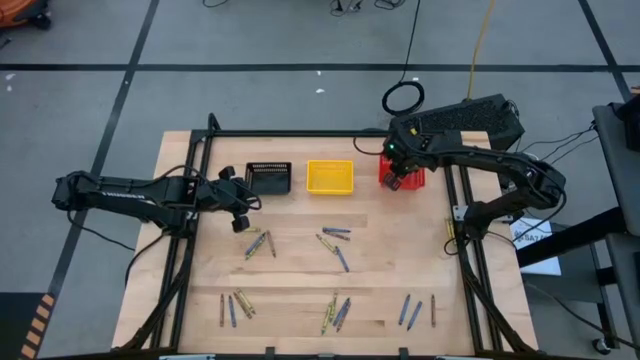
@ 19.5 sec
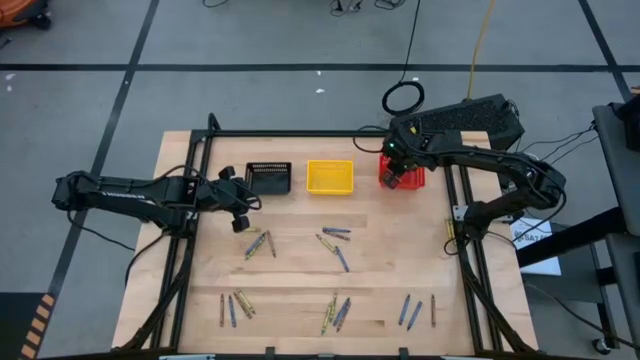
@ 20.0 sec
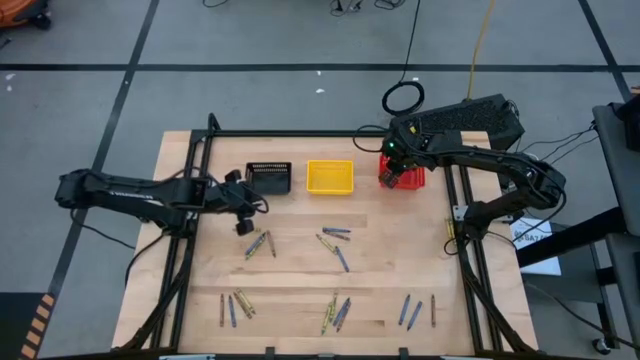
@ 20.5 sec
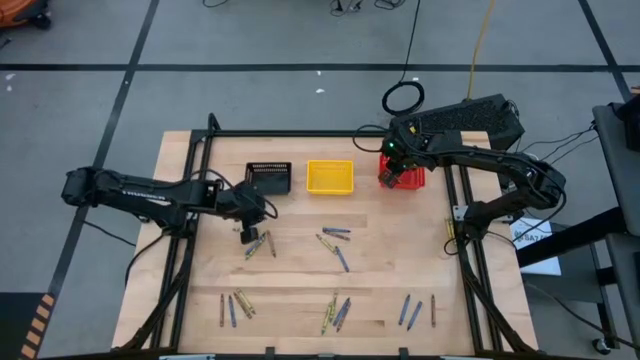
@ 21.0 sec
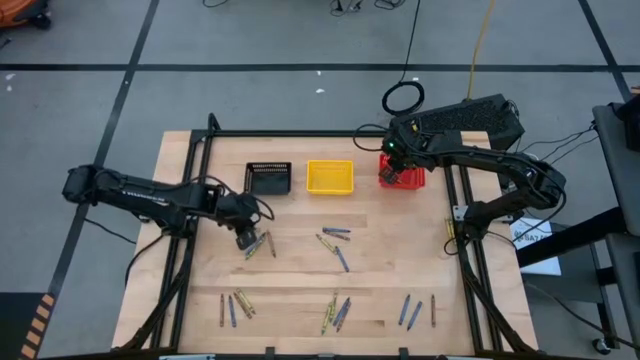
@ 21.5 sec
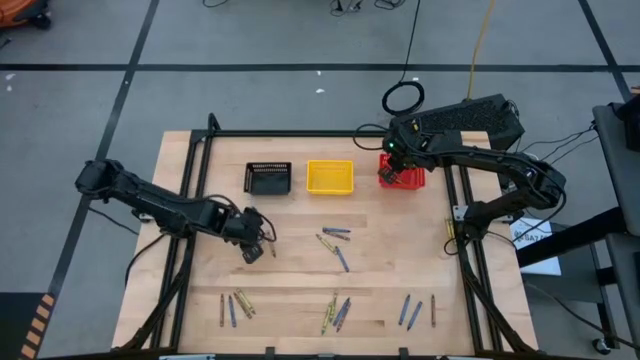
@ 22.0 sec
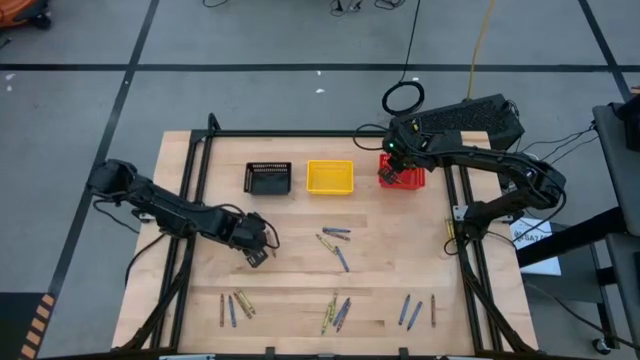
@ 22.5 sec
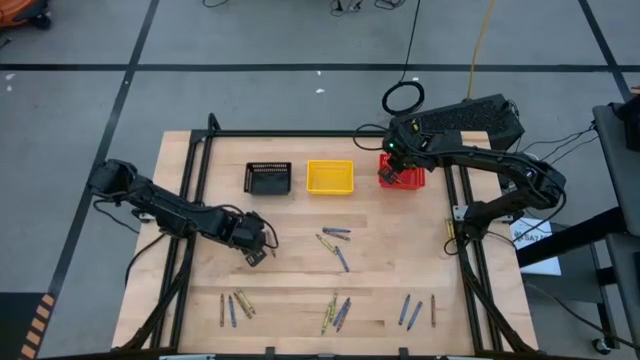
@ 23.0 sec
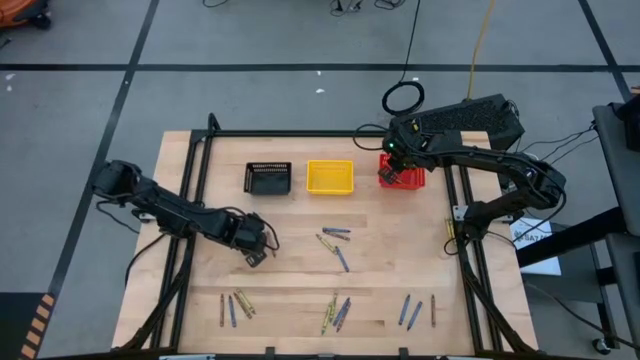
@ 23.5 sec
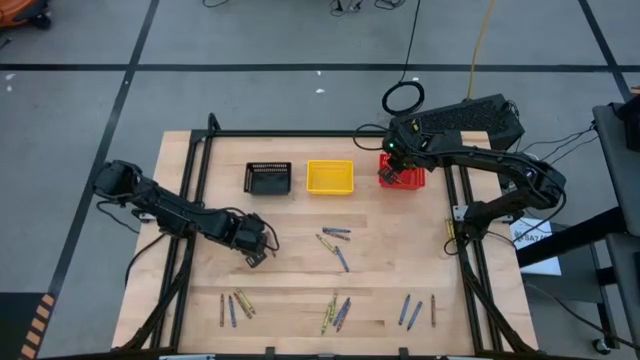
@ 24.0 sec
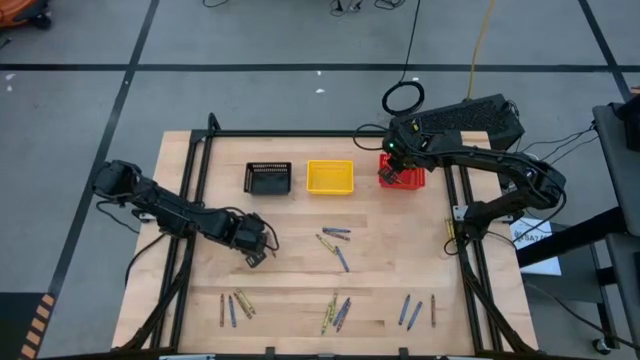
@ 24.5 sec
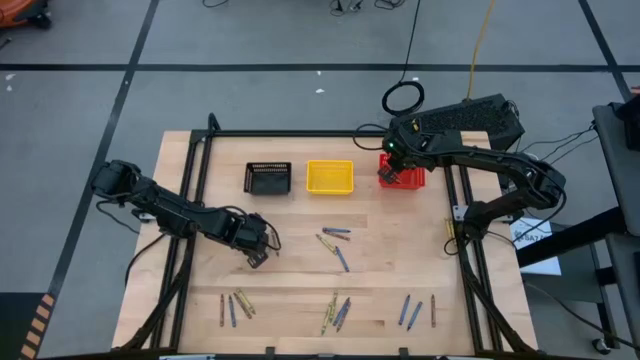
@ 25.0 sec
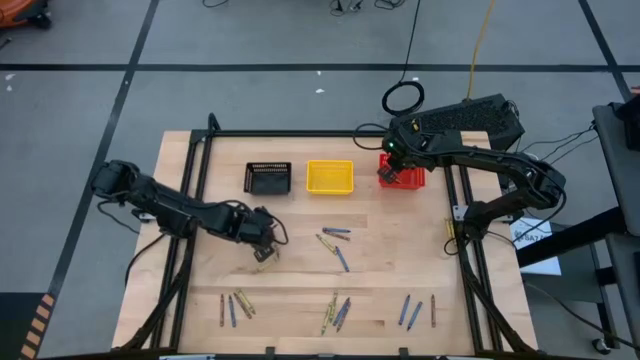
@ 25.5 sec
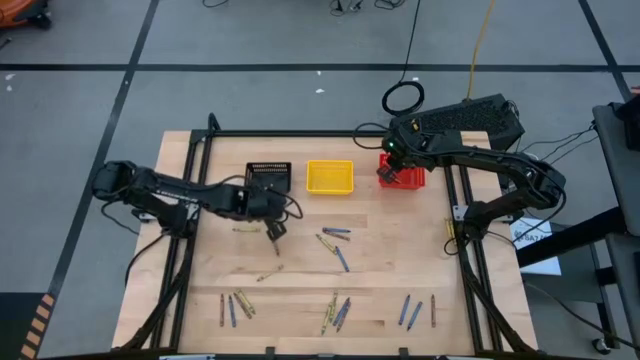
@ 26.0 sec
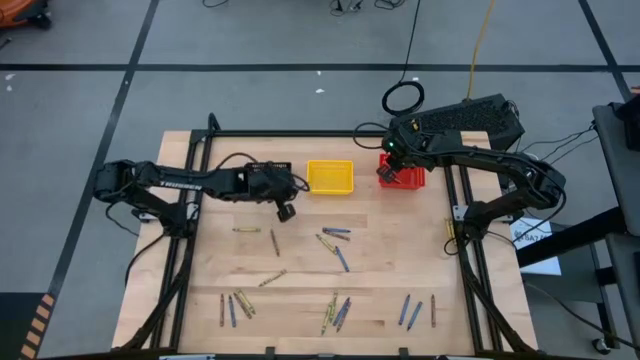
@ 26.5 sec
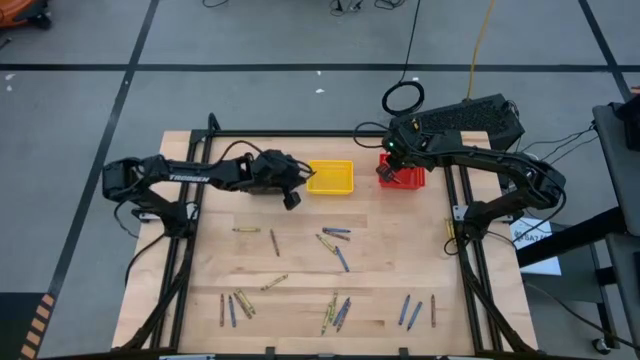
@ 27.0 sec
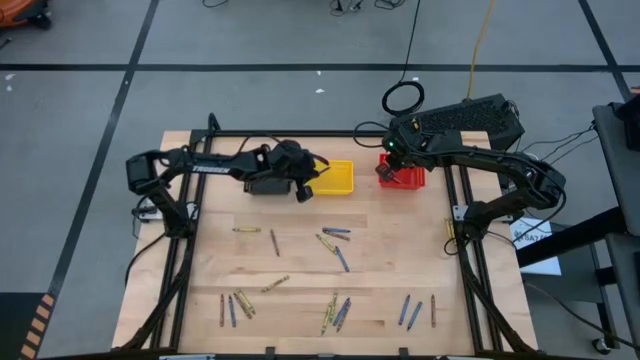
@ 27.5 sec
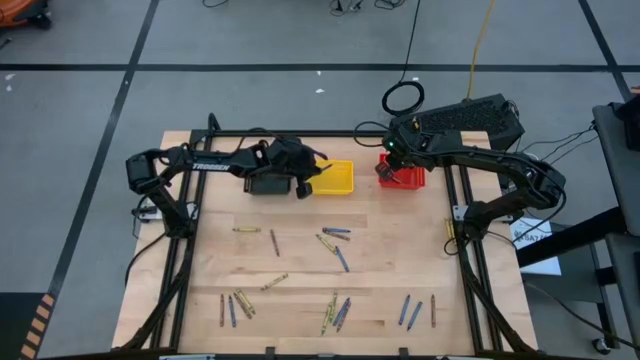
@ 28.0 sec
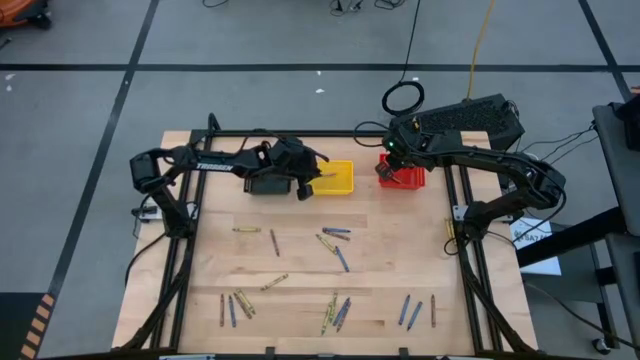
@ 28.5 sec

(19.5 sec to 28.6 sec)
Task: Sort crayons
Put the blue crayon into the yellow bin

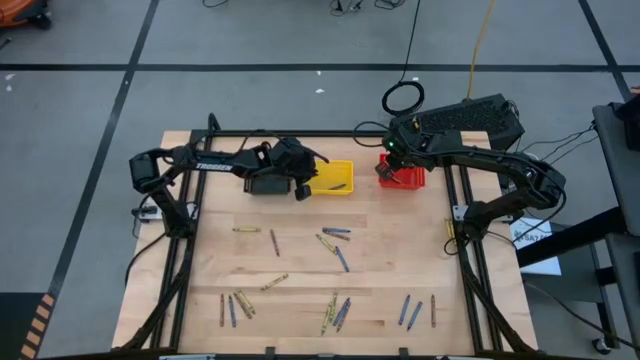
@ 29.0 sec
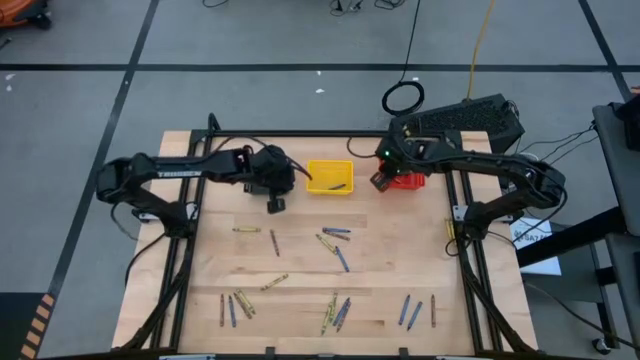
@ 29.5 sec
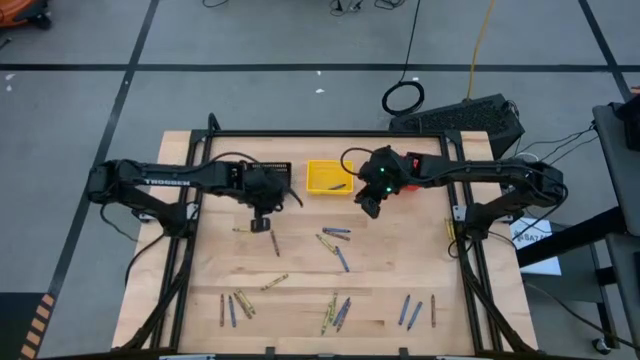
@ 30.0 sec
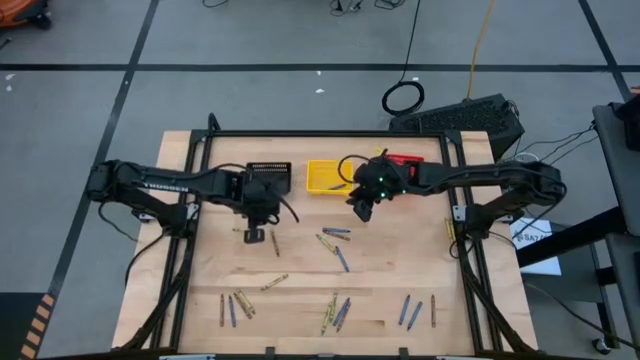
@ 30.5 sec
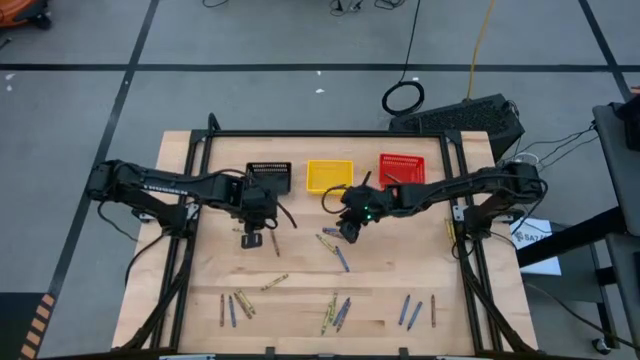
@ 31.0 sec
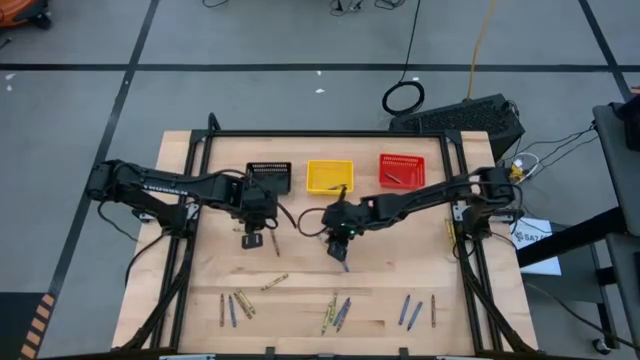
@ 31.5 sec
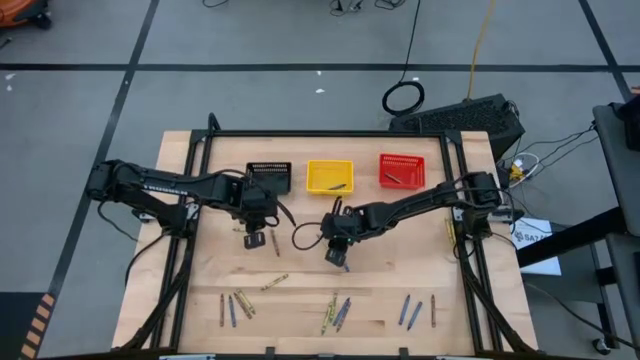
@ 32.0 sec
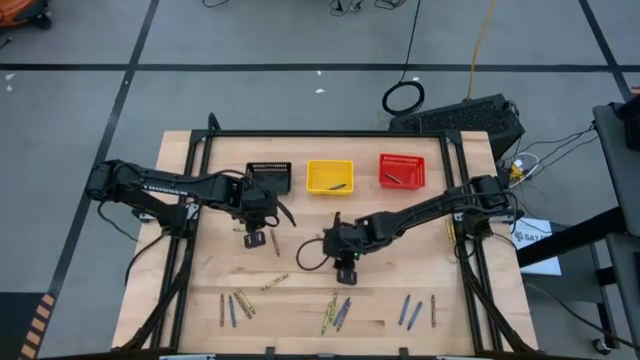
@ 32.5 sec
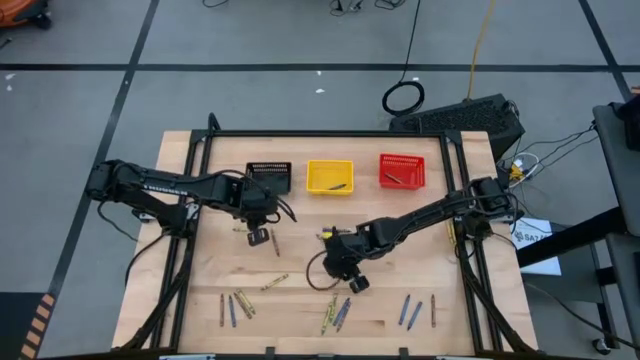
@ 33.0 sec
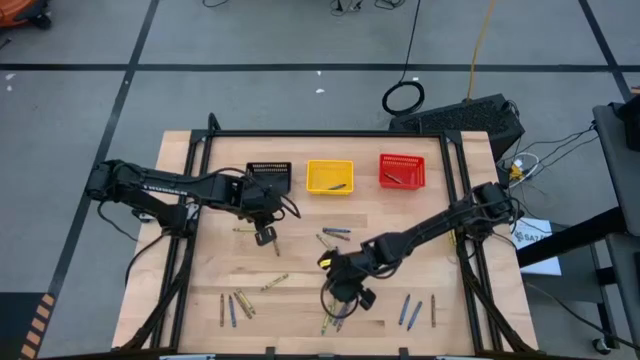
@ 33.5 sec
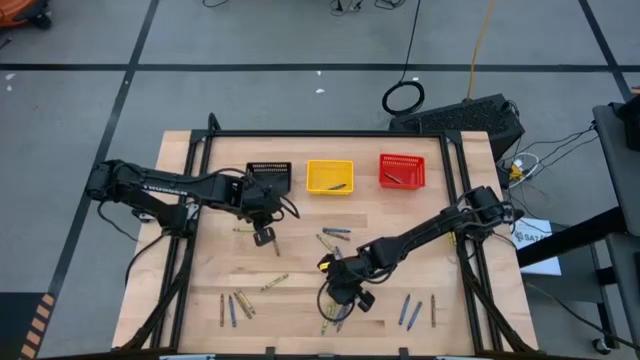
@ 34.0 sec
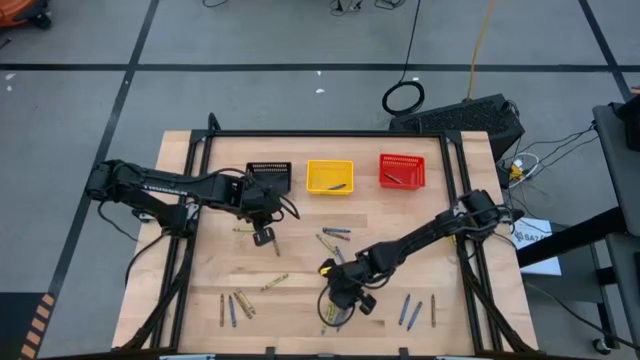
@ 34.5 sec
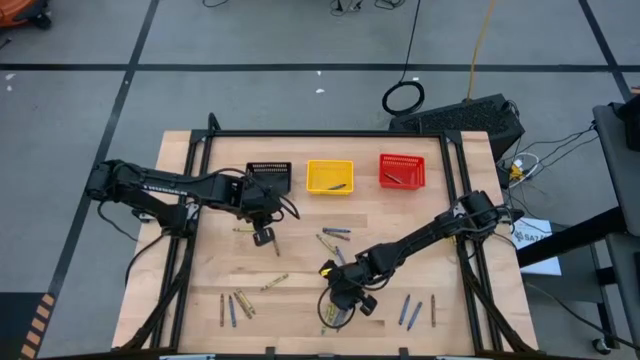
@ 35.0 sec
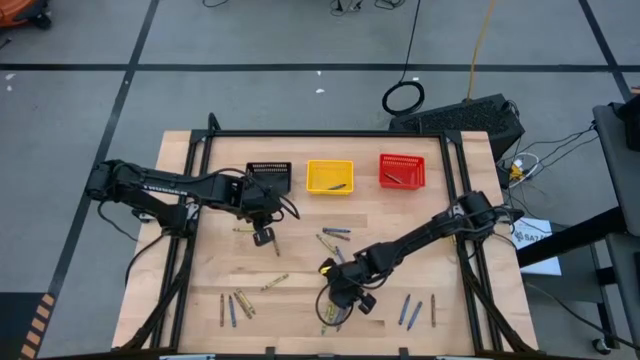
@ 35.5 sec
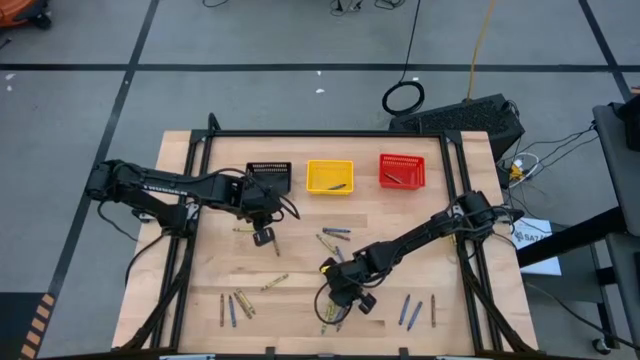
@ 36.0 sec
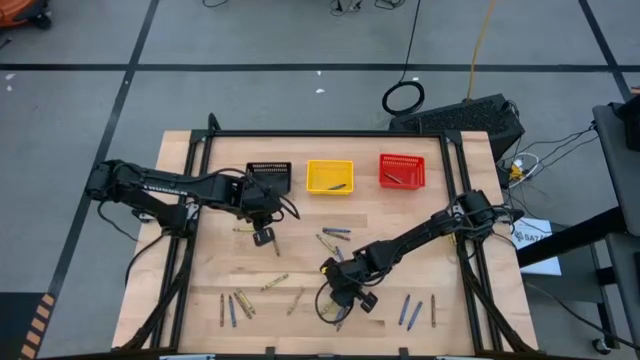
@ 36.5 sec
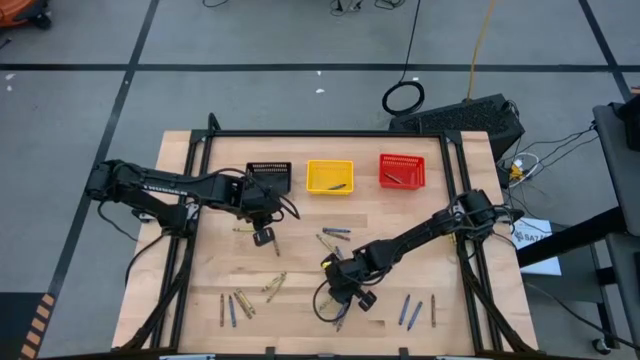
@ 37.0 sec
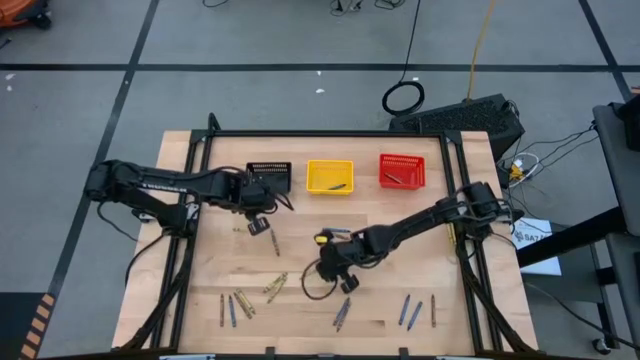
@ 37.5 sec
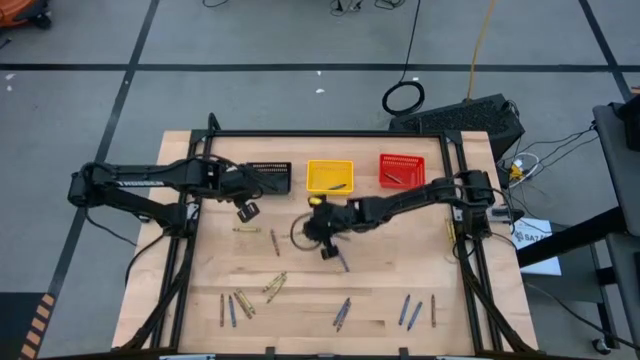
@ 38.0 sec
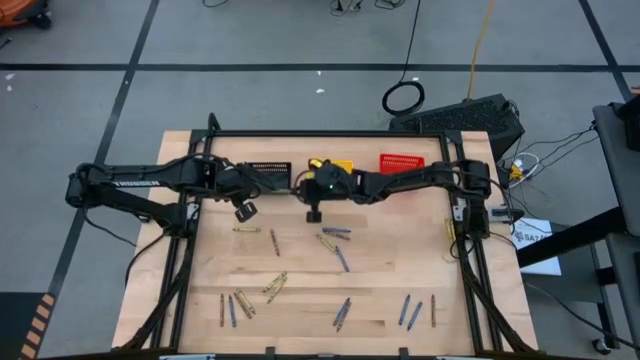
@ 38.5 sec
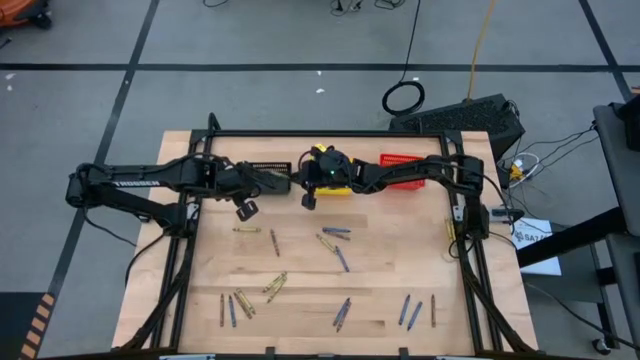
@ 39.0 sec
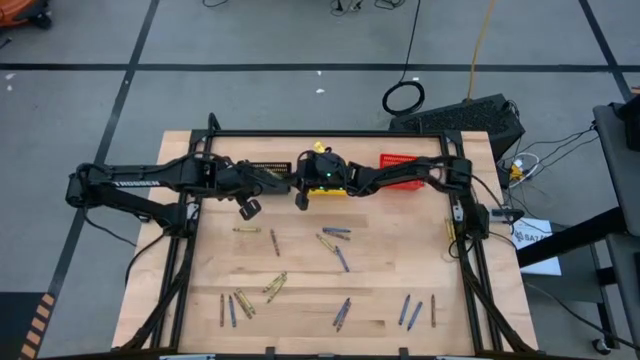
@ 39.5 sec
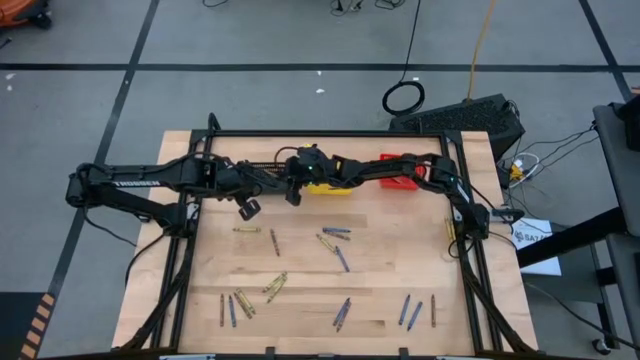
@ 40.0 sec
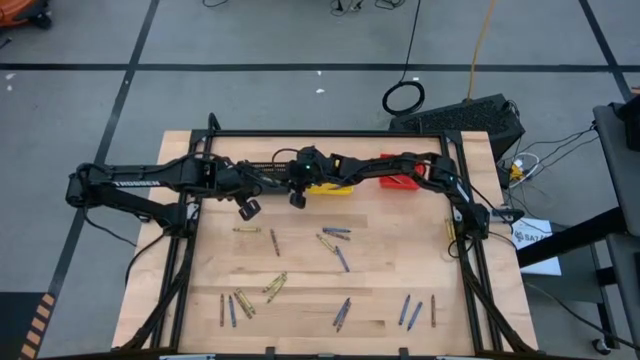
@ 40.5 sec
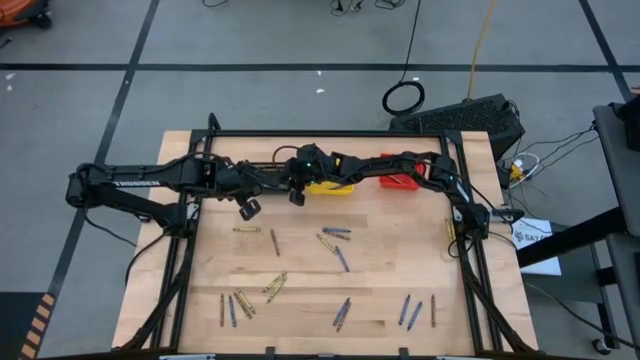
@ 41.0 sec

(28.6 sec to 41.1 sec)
Put the green crayon into the black bin
